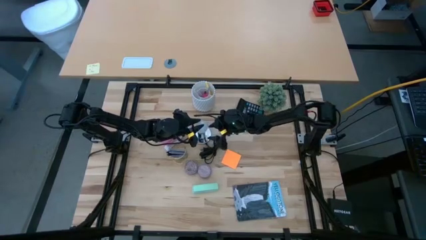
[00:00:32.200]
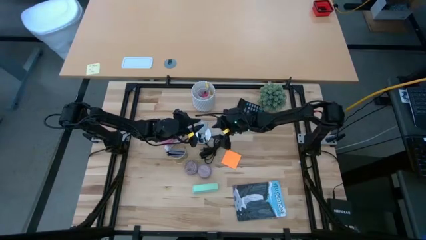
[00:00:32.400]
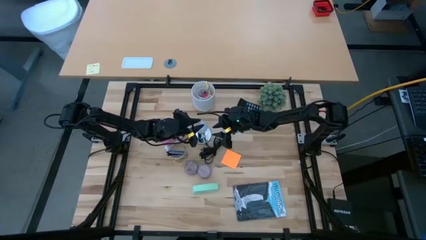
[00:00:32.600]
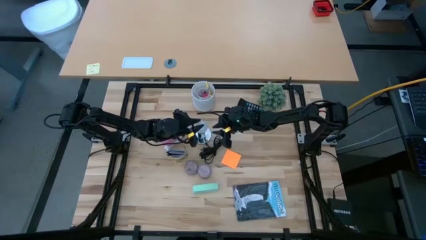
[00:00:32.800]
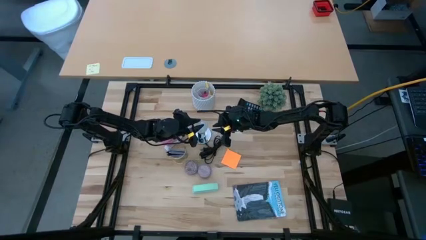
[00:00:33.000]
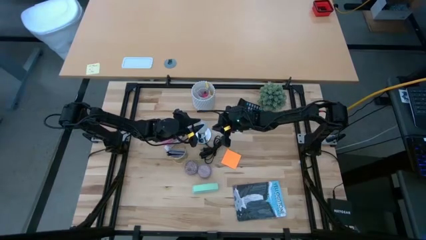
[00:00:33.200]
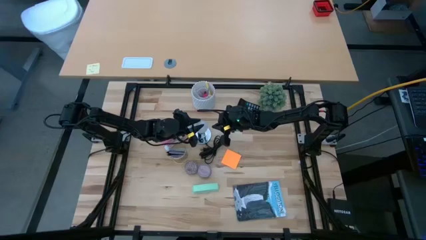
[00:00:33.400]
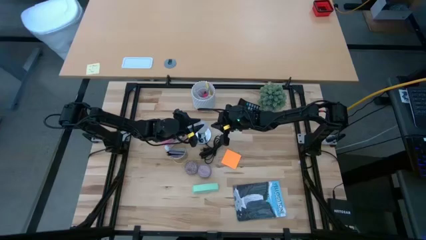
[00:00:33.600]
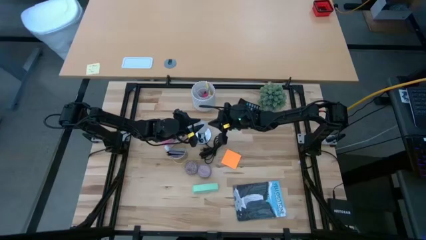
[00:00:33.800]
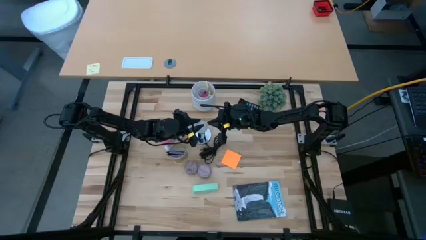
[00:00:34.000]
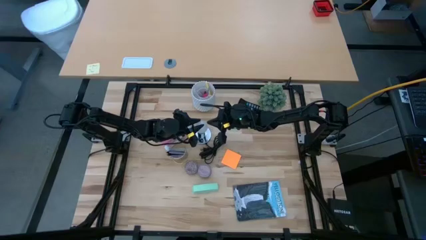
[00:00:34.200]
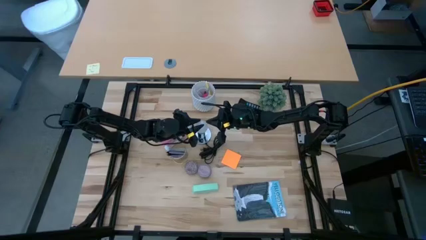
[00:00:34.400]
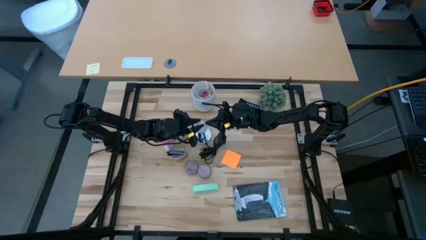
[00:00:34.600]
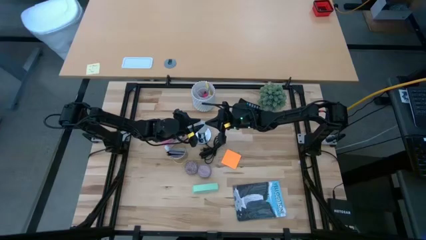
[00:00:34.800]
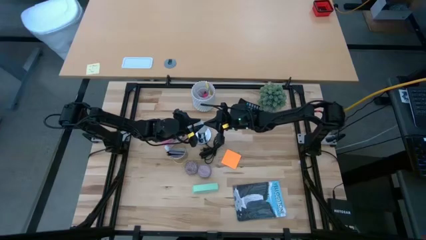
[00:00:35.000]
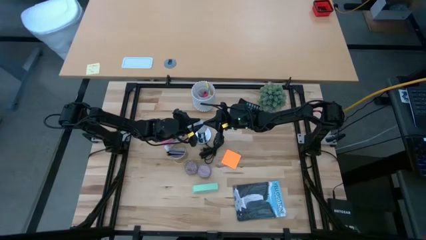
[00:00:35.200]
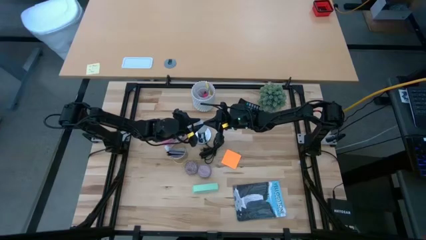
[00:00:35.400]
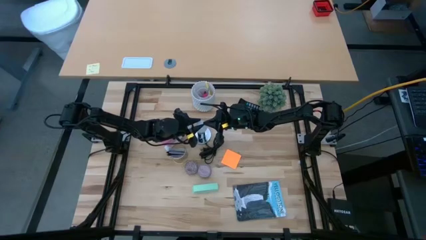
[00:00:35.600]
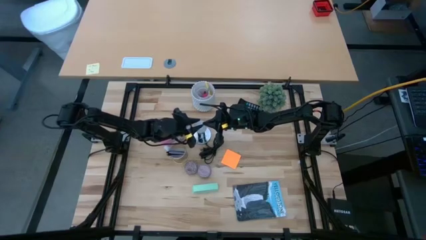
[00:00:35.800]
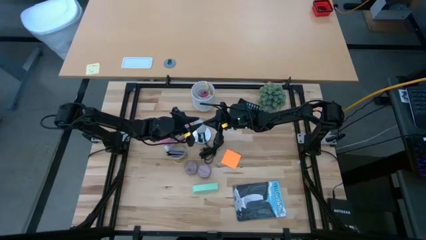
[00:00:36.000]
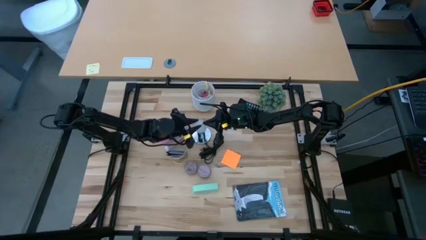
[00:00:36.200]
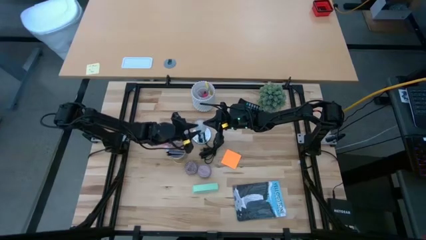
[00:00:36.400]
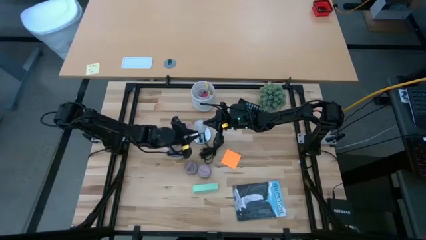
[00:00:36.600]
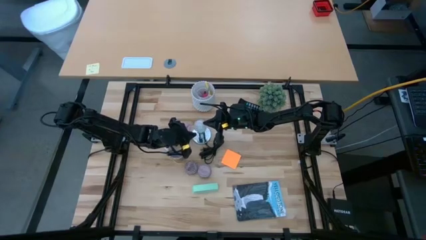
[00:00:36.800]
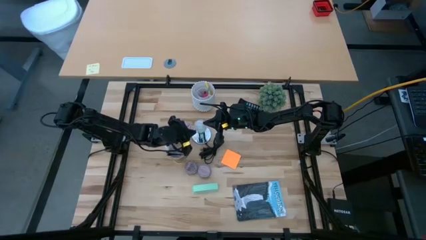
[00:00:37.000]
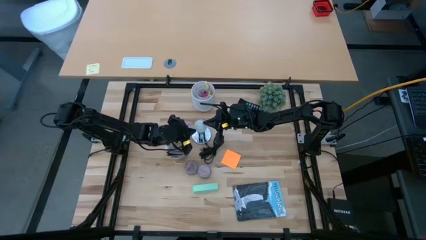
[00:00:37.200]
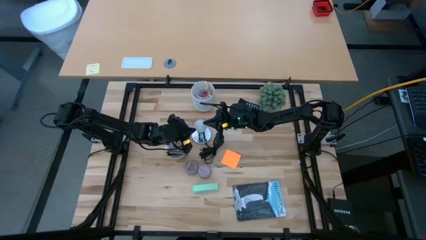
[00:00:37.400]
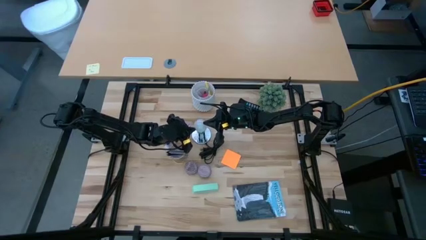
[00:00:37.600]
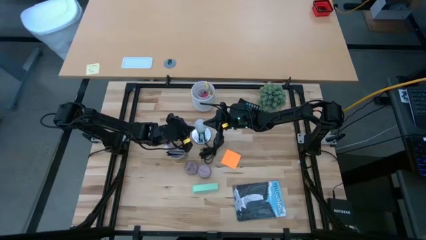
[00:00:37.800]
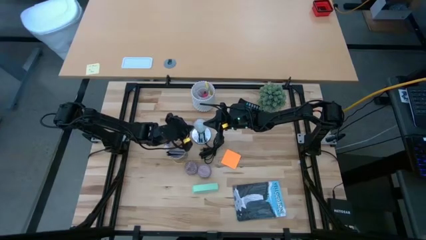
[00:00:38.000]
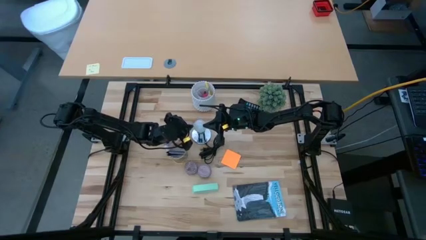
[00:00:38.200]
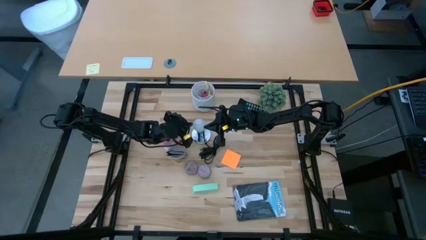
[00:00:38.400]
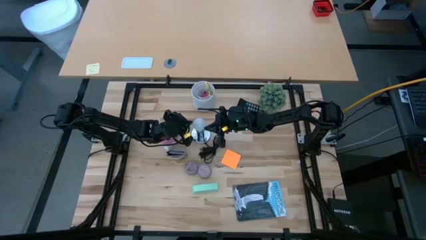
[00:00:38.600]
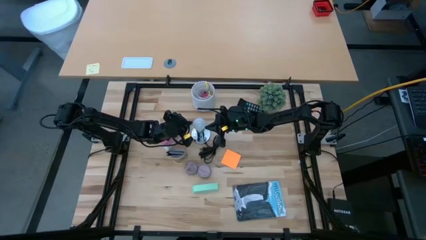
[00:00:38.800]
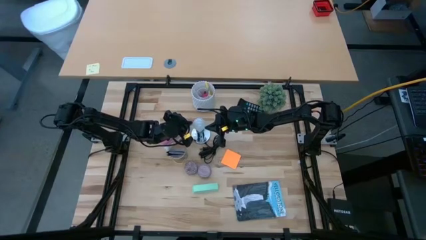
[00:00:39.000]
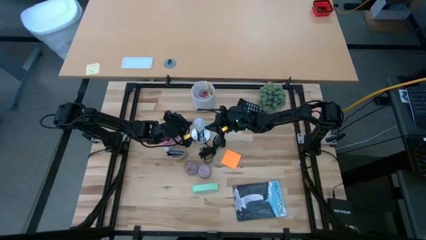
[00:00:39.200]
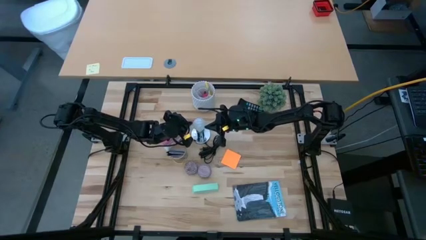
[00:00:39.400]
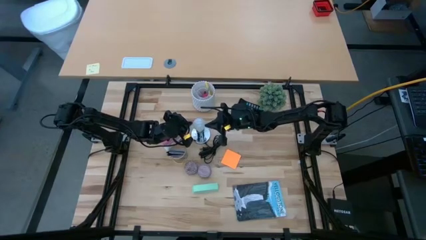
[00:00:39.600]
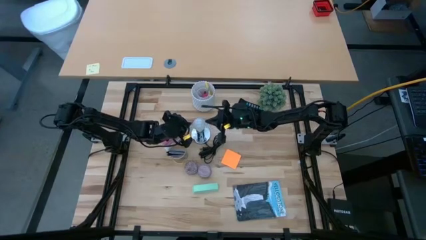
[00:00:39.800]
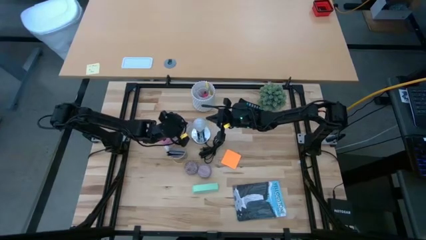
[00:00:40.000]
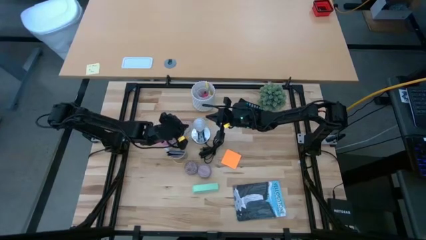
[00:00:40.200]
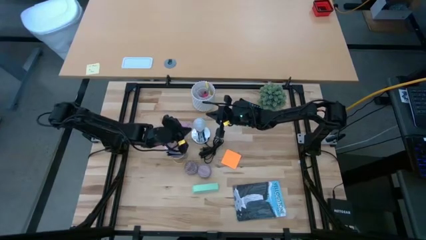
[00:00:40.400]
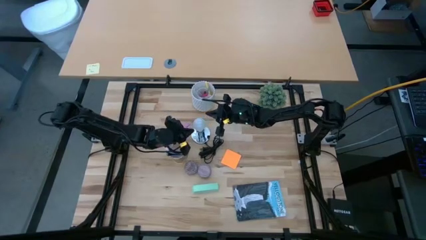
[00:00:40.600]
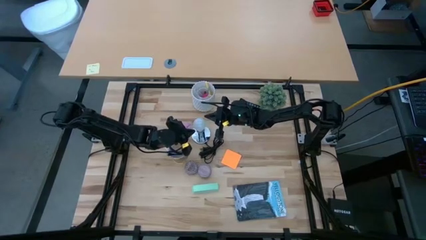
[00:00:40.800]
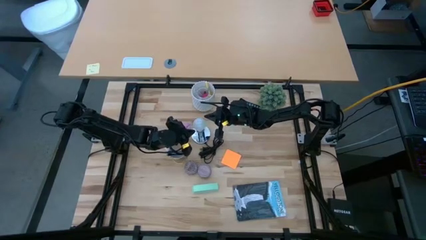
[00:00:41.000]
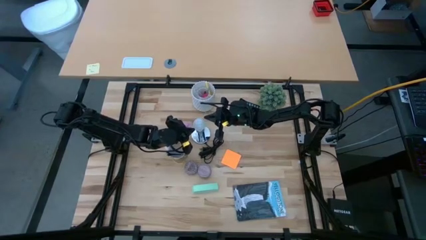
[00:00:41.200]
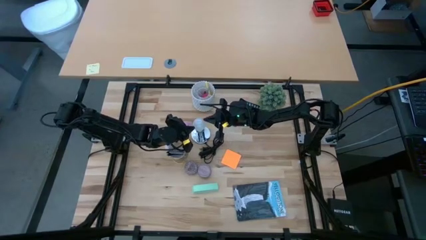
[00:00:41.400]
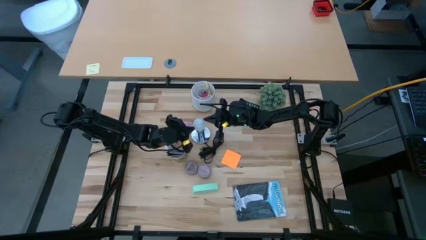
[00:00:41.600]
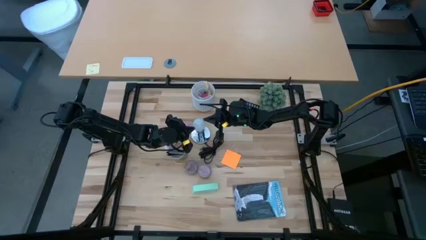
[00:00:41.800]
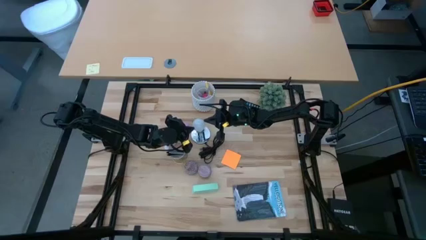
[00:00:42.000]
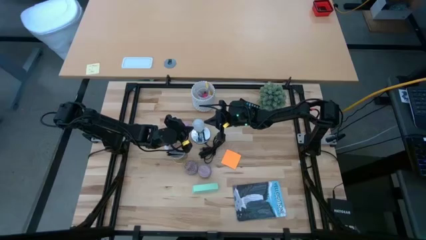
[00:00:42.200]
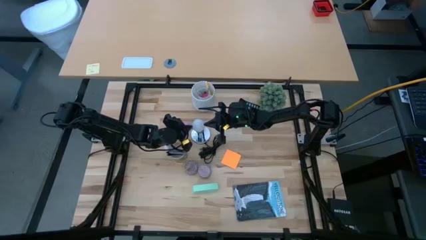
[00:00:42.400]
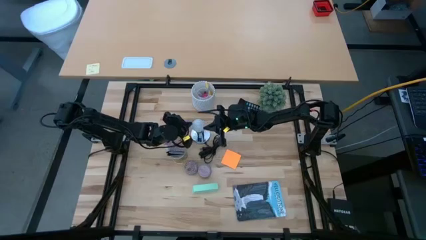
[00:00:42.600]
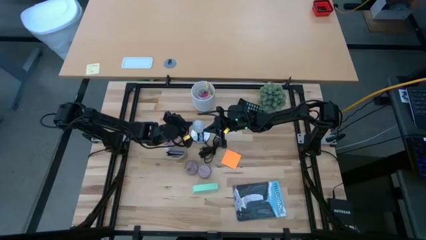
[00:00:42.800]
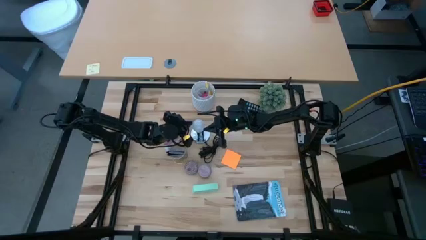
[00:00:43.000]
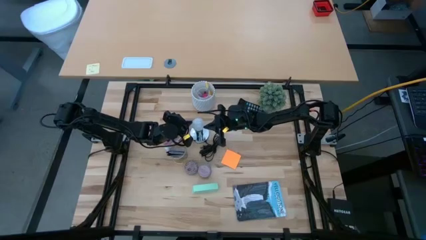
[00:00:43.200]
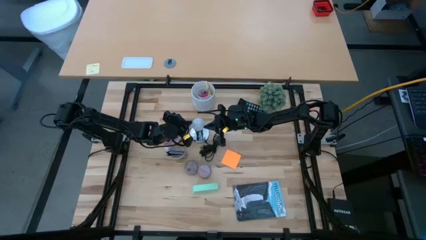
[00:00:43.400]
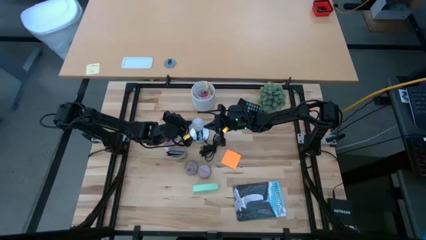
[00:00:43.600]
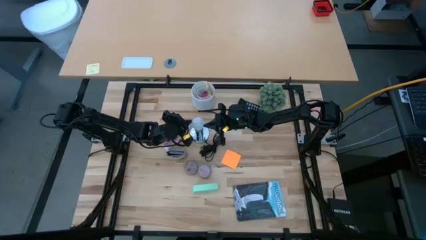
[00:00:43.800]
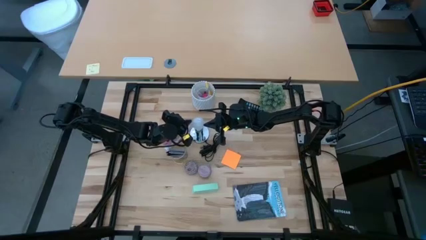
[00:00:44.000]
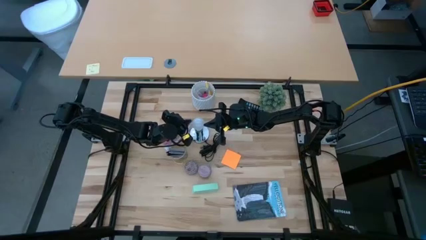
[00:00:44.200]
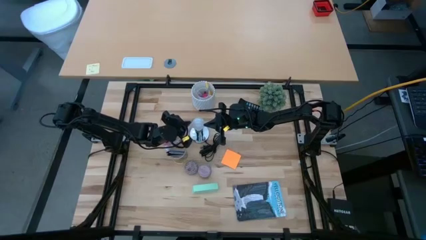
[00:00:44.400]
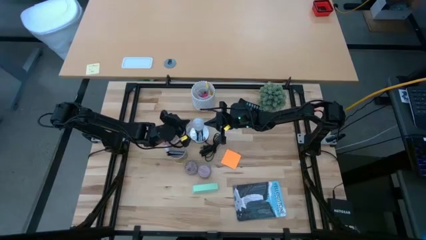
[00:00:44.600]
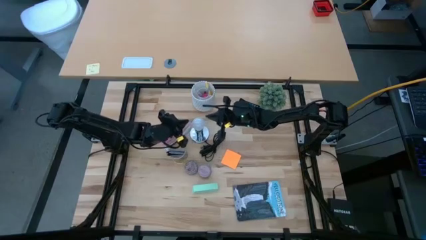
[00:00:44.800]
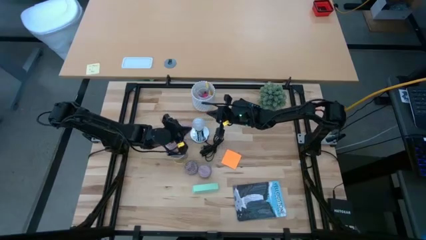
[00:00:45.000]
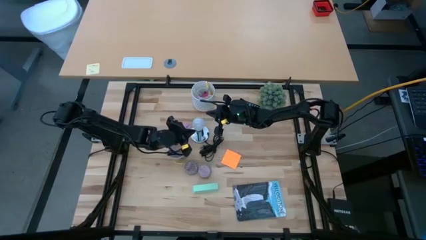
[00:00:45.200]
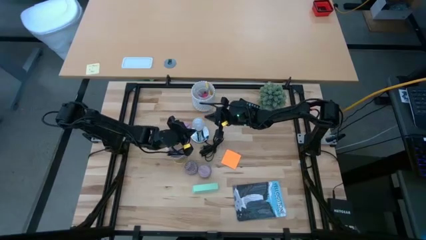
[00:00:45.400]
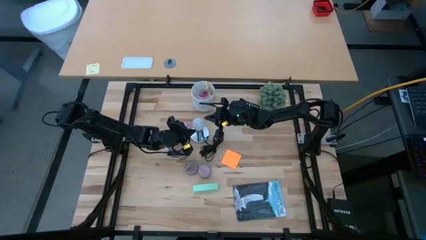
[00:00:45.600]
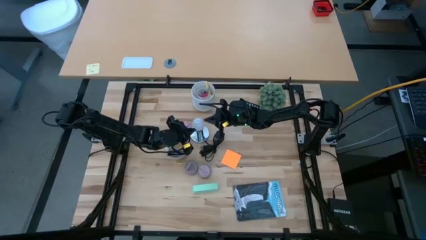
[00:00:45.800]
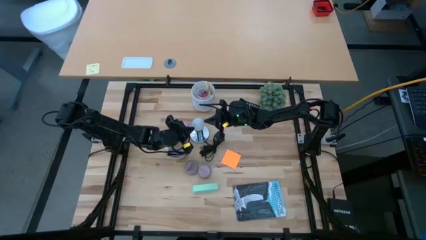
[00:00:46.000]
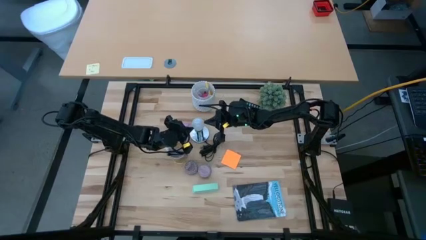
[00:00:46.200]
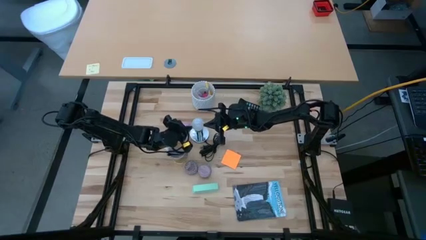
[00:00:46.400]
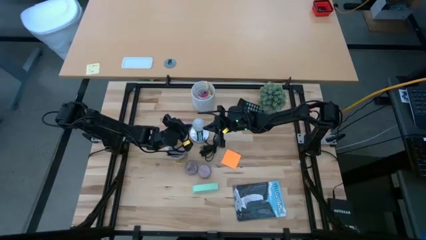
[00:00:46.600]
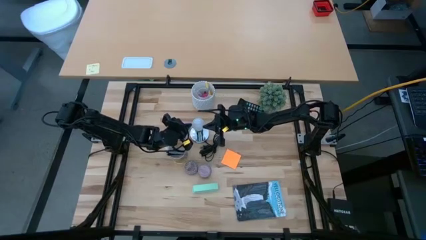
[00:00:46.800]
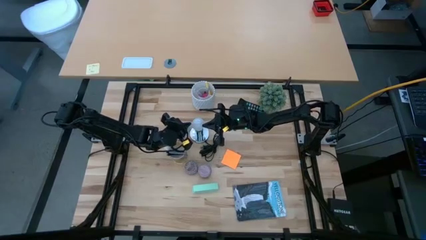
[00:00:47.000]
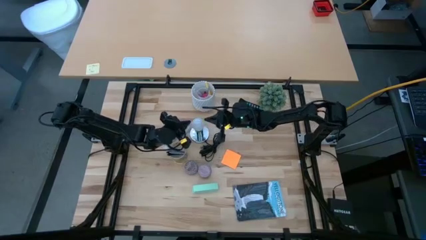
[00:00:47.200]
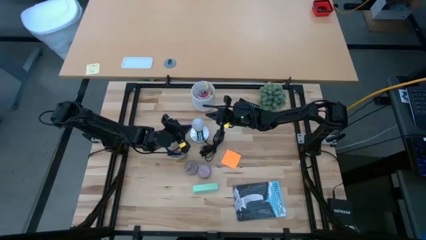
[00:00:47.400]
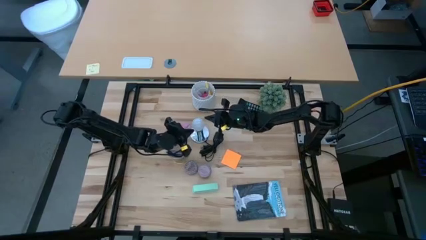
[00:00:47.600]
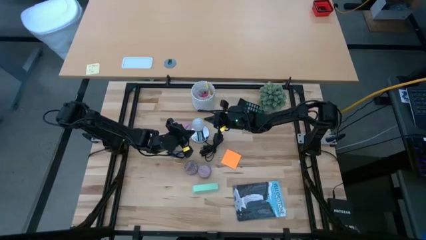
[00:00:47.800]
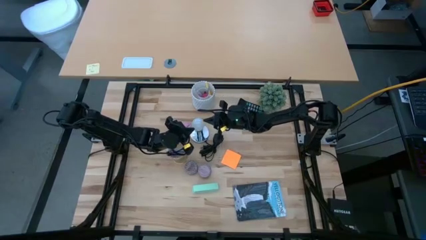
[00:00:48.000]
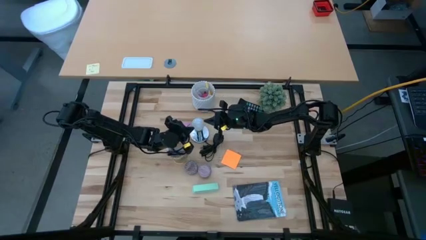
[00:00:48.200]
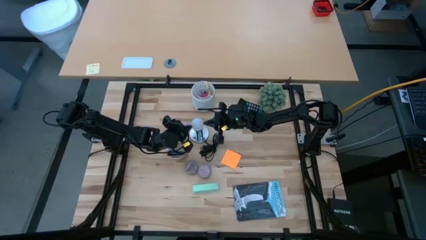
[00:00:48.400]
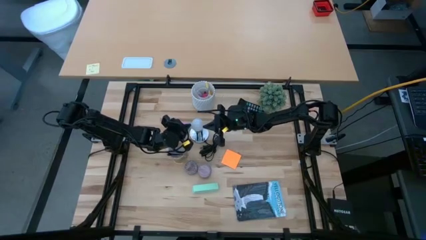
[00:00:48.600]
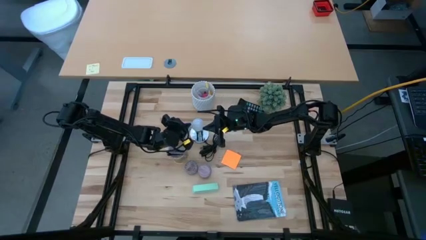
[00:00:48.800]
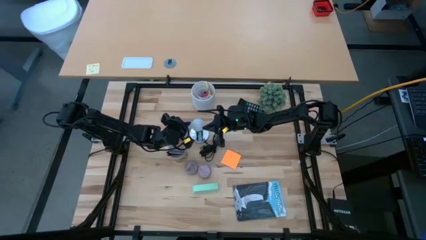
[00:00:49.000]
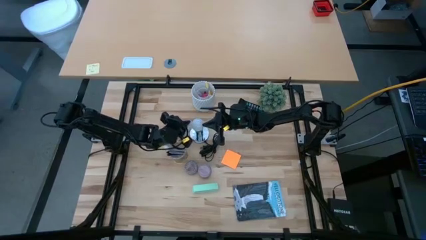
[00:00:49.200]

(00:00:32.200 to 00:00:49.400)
Task: Screw lightbulb
Insert the white lightbulb into the silver lamp
